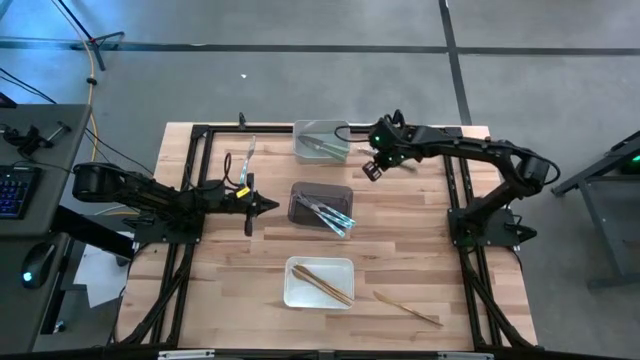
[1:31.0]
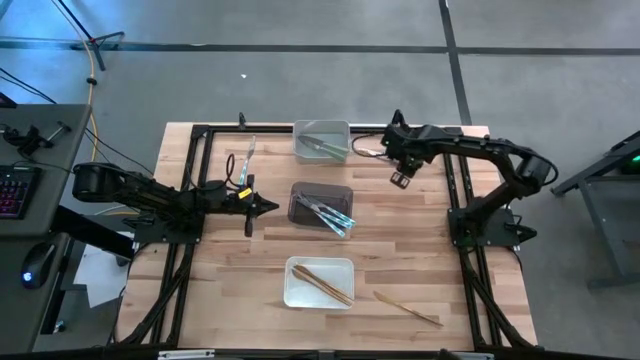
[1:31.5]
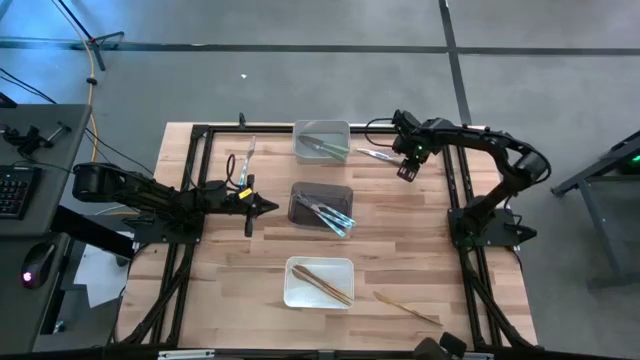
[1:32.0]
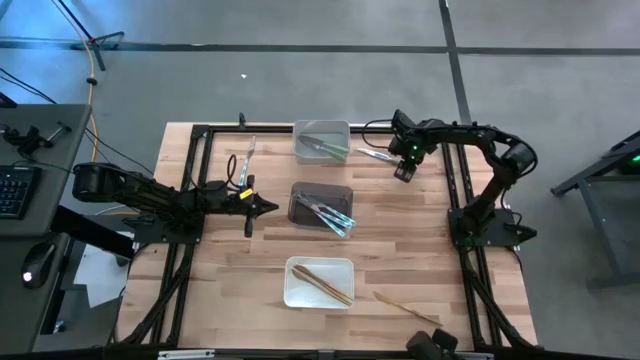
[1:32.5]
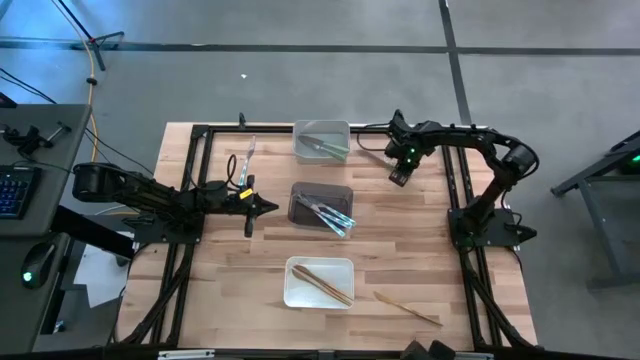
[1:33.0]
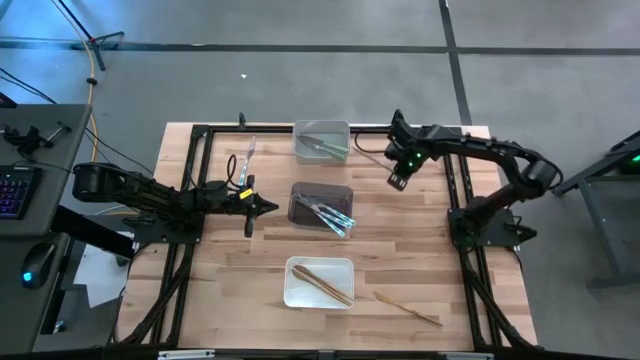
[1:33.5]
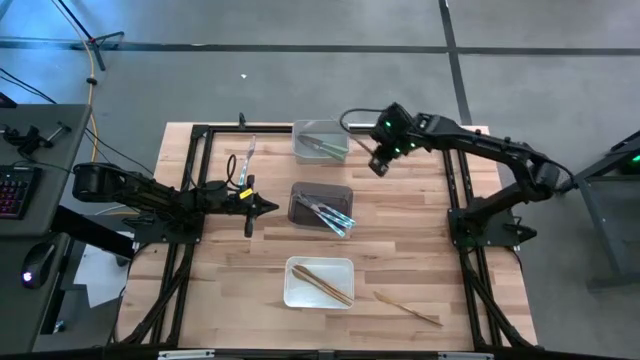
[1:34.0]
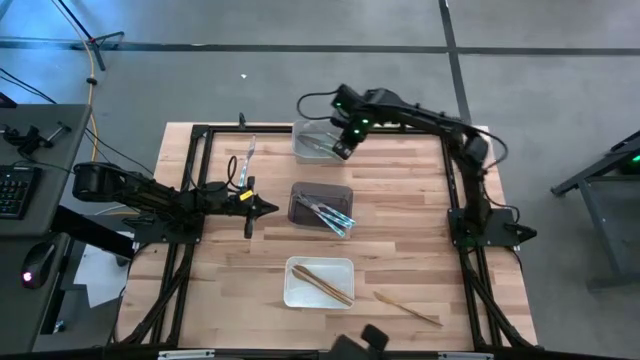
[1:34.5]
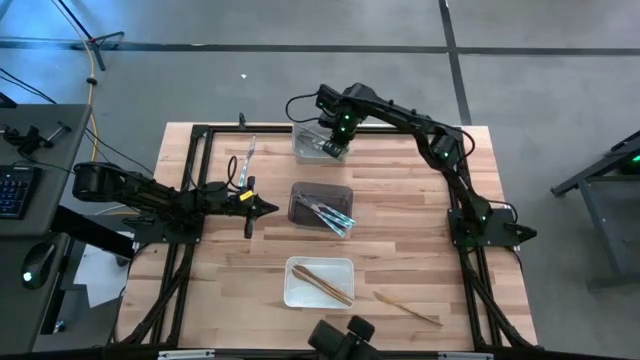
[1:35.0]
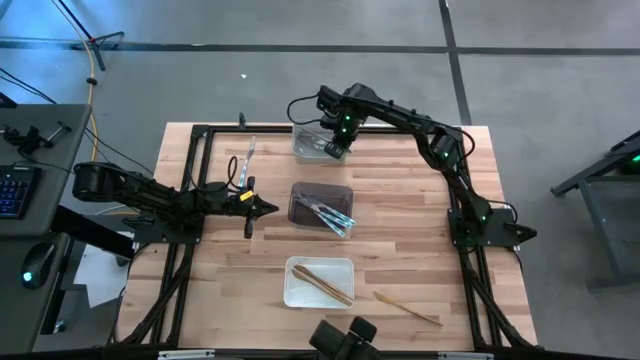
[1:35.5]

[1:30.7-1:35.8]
Task: Sort silverware by color (type)
Put the green table knife into the light gray bin

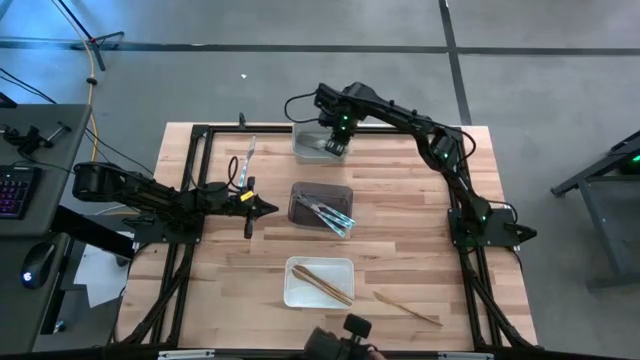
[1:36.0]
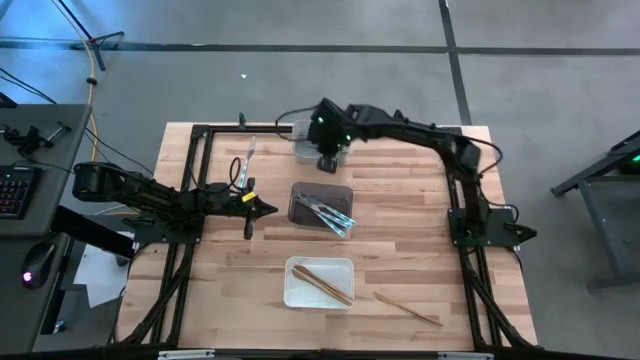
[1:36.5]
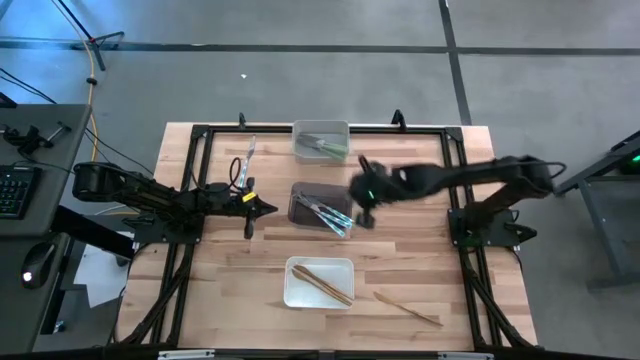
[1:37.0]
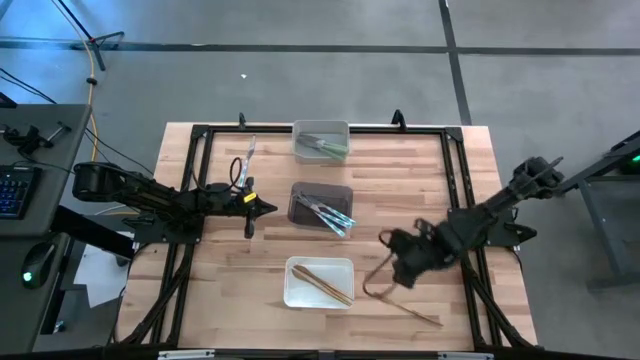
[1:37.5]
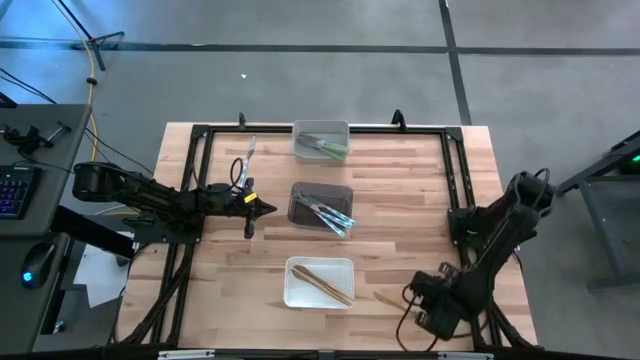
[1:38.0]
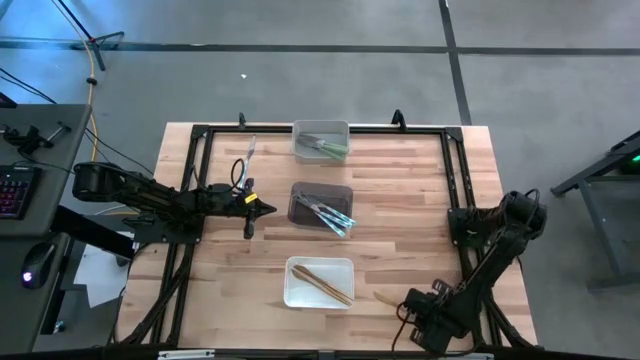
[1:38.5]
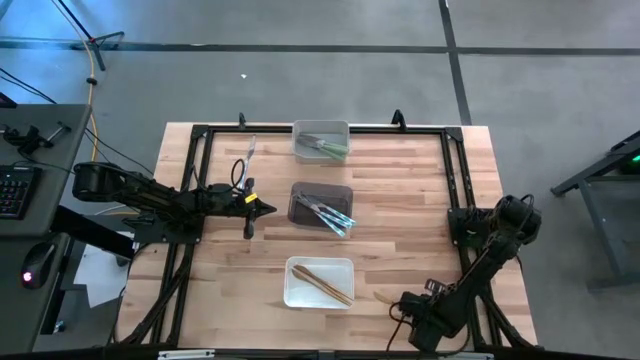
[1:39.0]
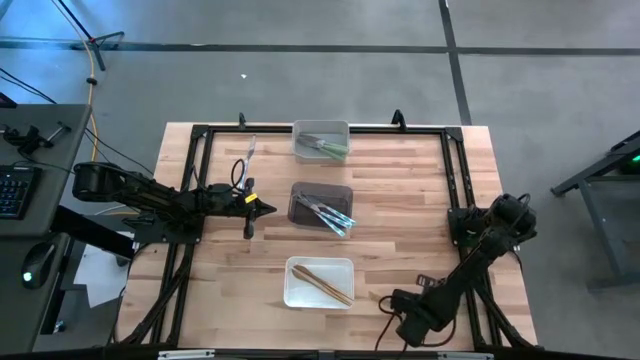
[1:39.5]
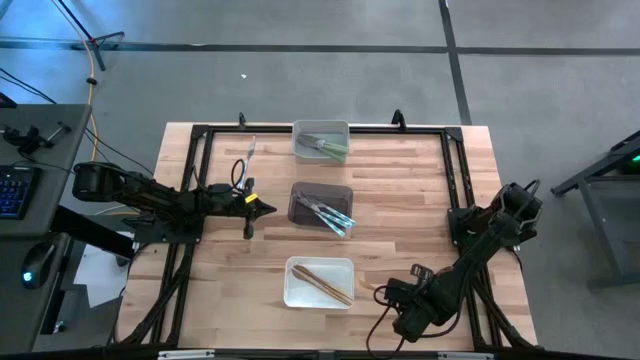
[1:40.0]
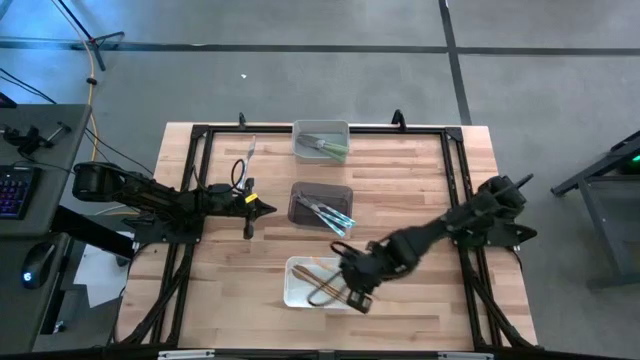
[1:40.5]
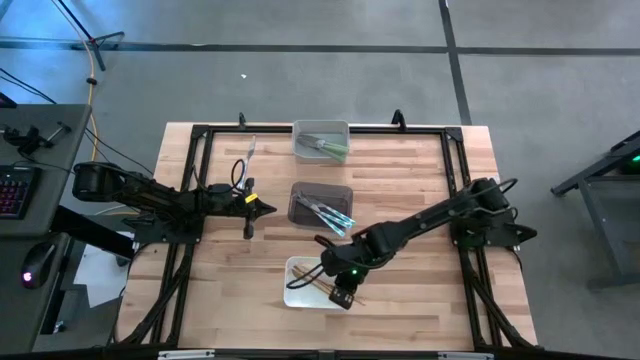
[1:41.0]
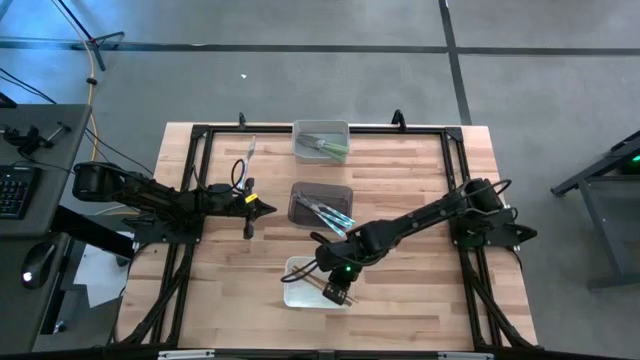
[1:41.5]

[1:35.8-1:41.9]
Put the gold table knife into the white bin

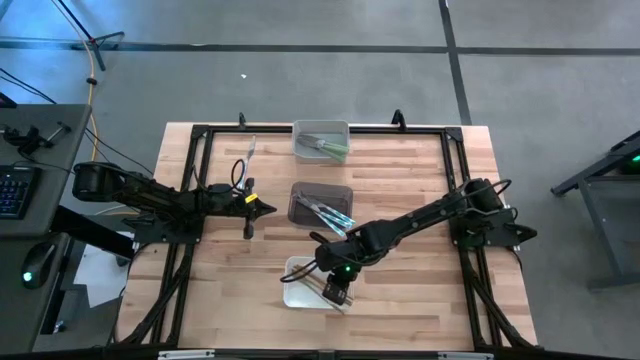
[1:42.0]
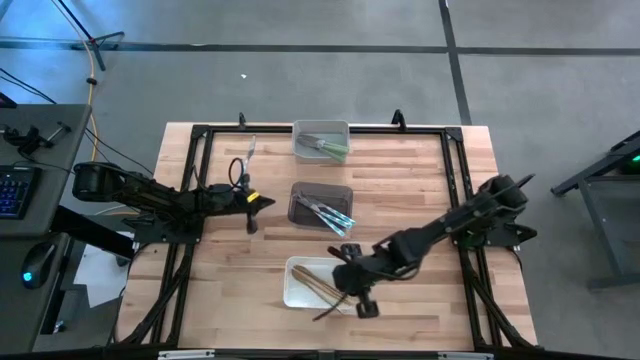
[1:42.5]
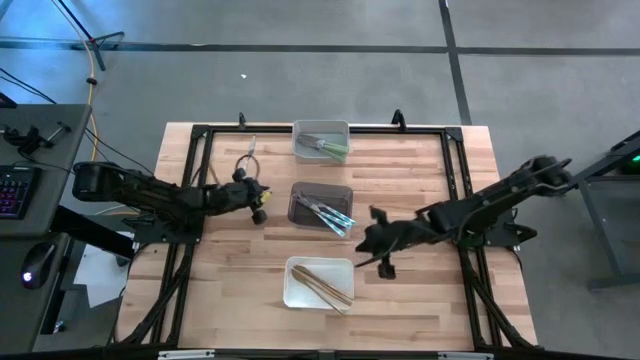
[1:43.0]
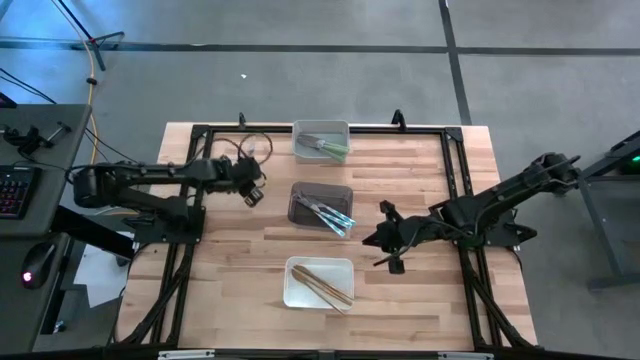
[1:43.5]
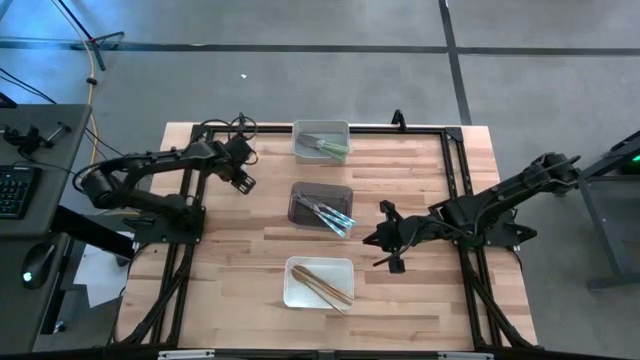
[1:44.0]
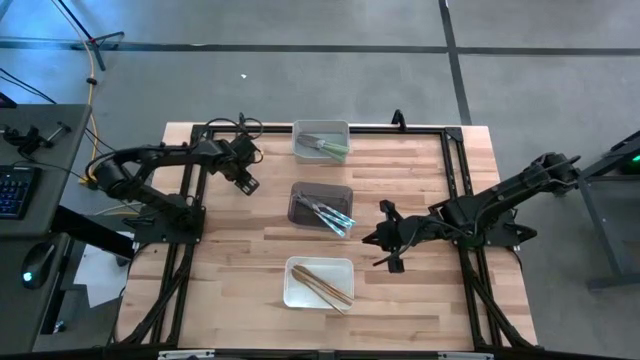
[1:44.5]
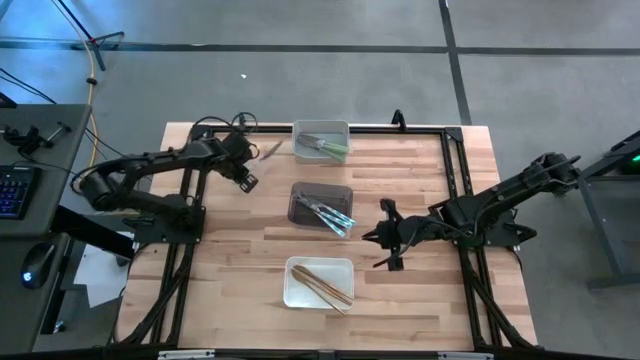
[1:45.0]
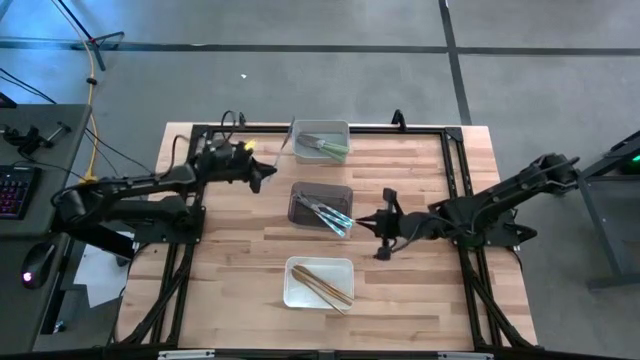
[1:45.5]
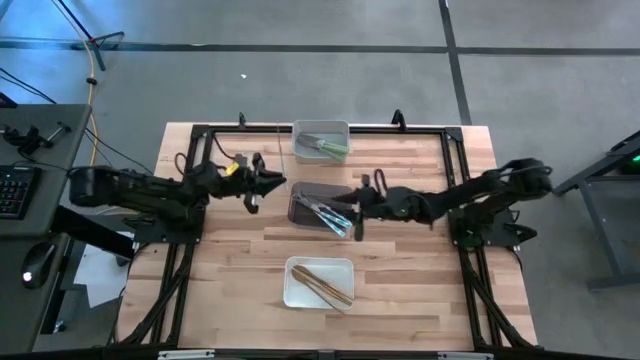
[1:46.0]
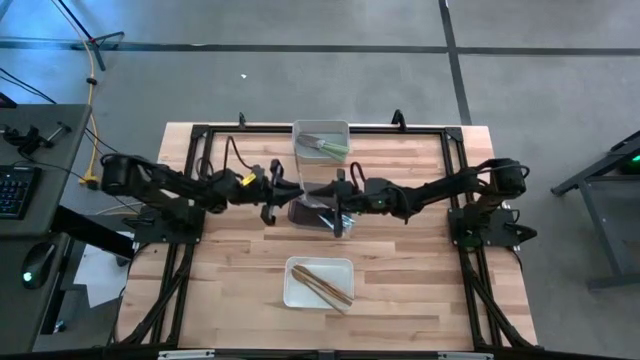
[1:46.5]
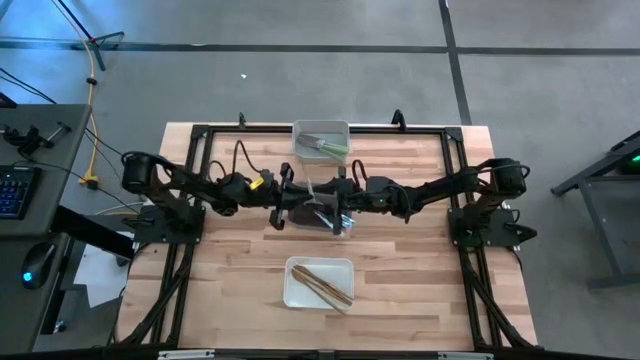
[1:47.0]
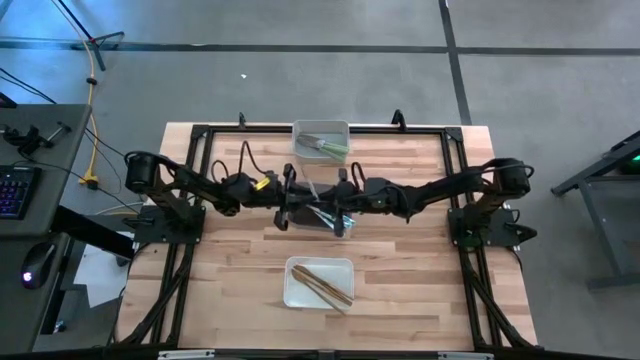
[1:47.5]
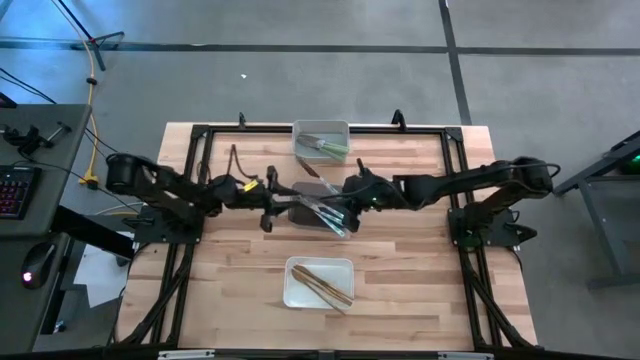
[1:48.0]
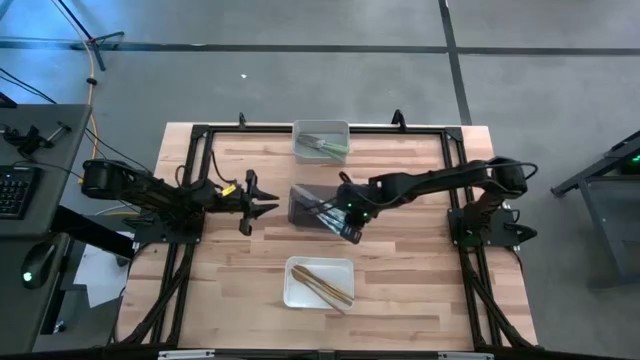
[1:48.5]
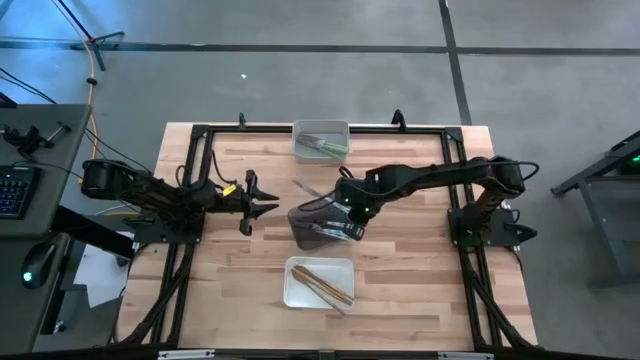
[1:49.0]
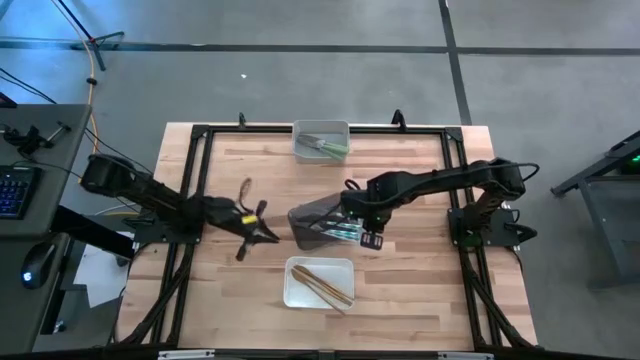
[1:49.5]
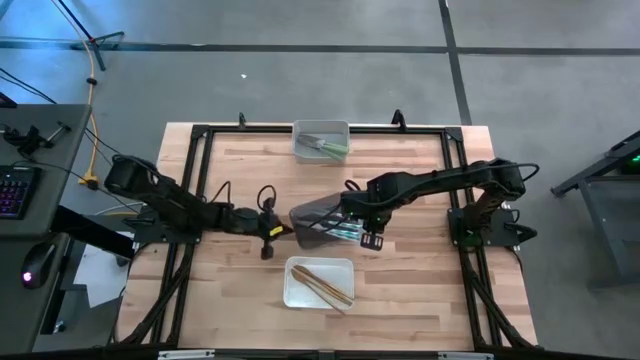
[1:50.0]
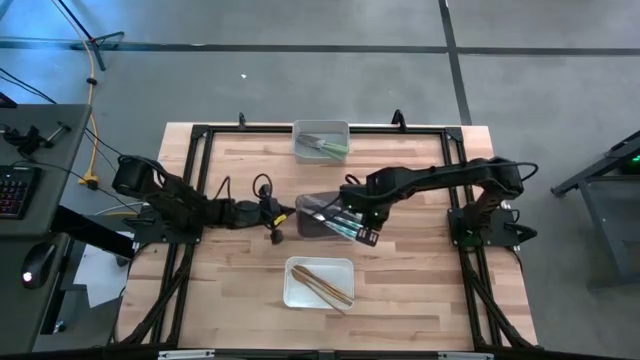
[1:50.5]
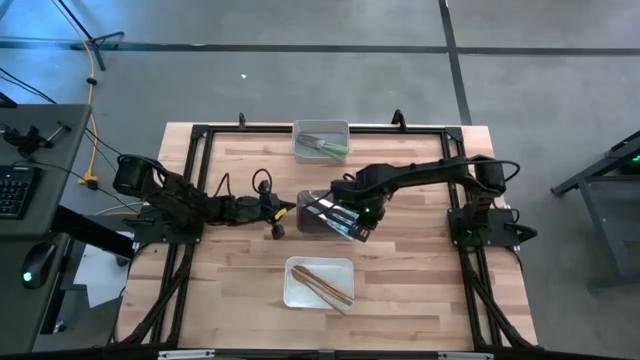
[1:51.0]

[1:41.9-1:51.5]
Put the blue patterned knife into the black bin

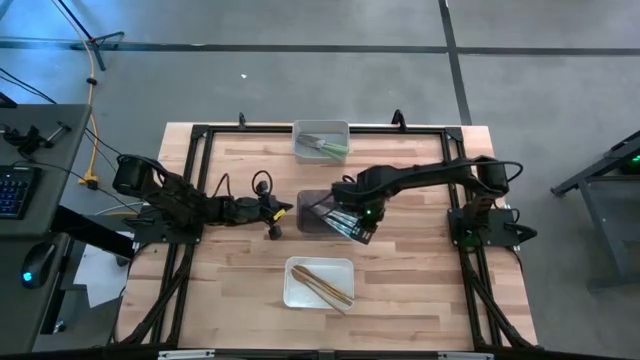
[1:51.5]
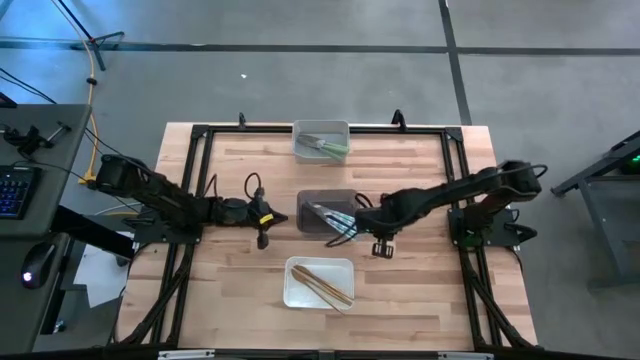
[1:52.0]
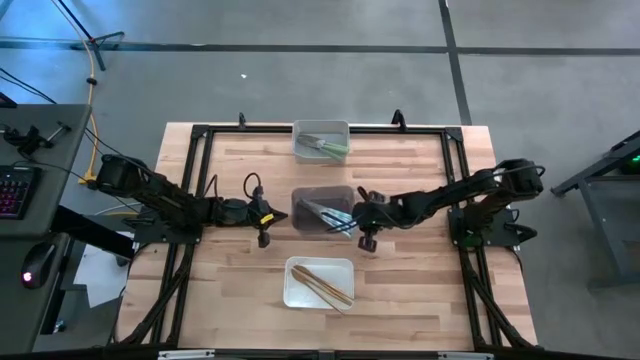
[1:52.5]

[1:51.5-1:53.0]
Adjust the black bin
